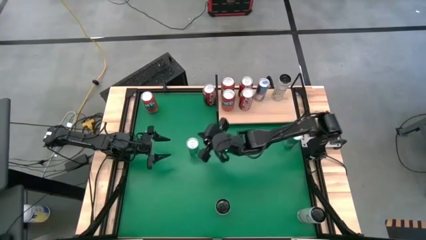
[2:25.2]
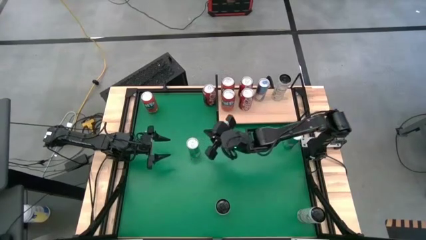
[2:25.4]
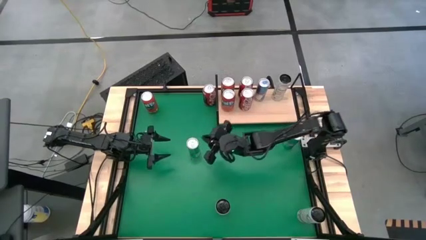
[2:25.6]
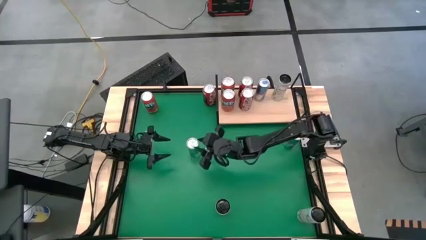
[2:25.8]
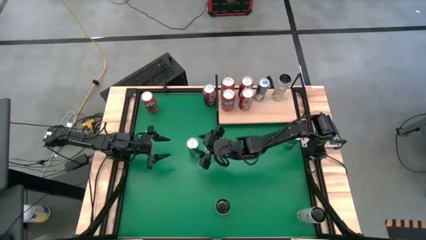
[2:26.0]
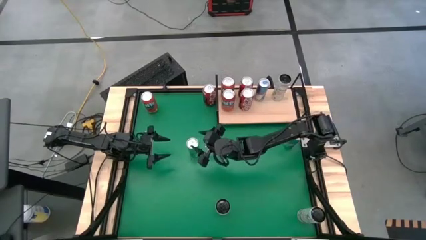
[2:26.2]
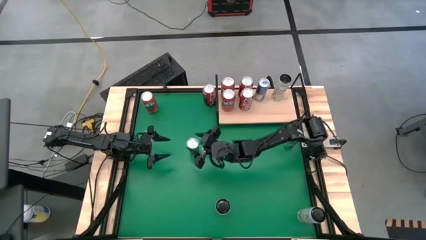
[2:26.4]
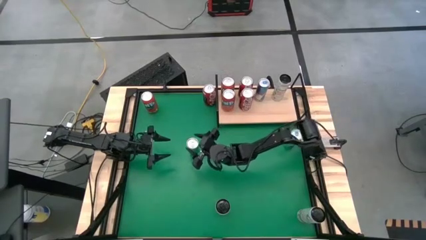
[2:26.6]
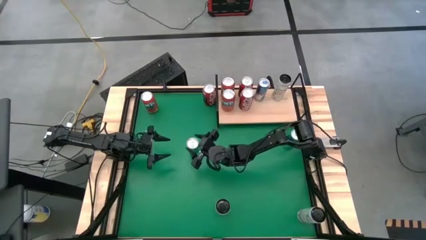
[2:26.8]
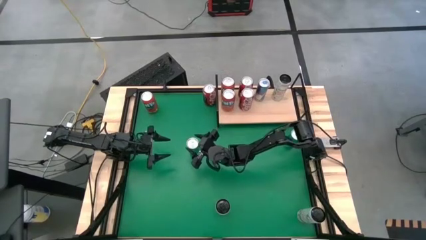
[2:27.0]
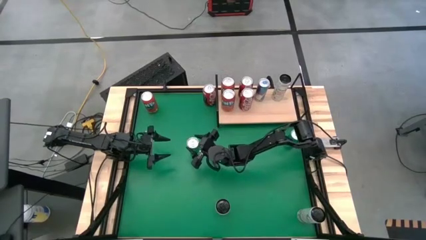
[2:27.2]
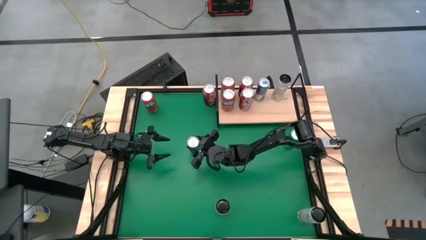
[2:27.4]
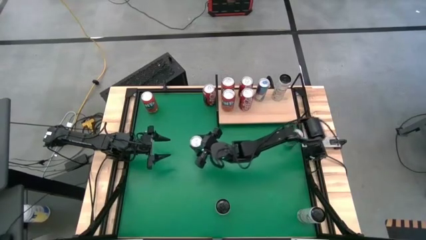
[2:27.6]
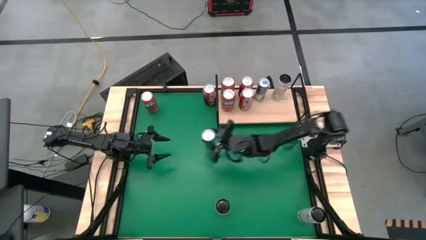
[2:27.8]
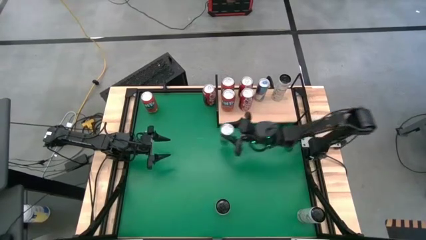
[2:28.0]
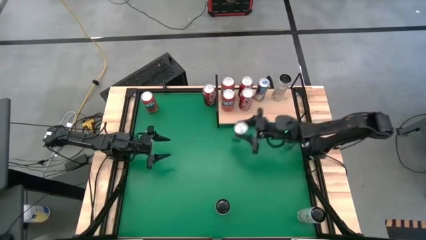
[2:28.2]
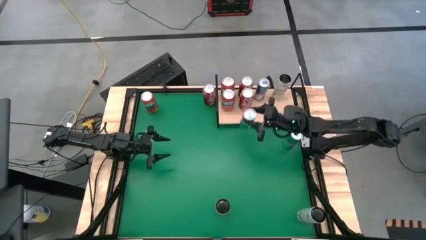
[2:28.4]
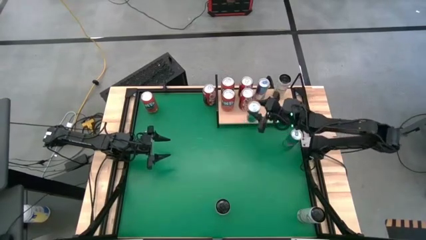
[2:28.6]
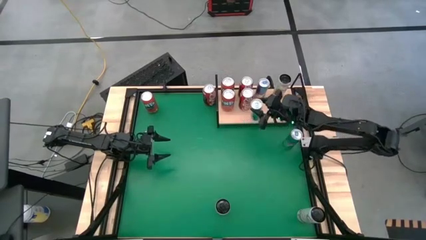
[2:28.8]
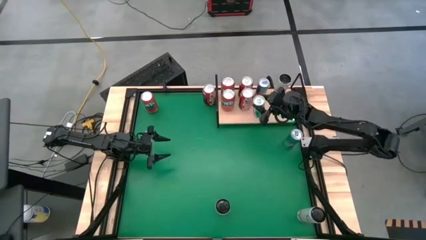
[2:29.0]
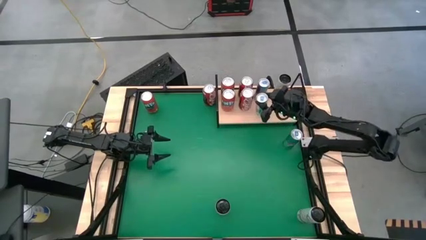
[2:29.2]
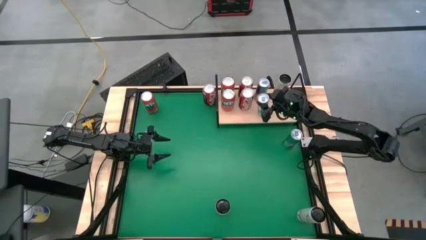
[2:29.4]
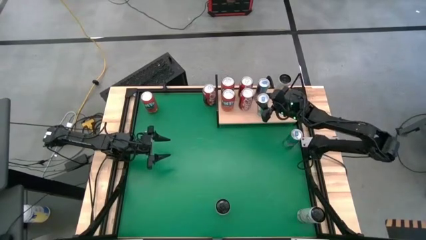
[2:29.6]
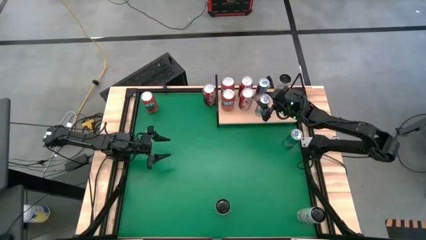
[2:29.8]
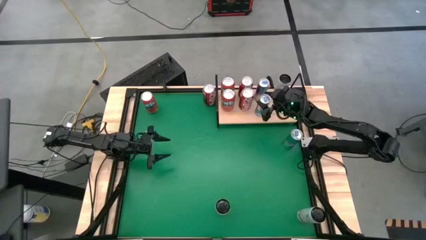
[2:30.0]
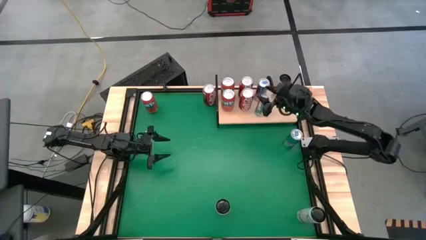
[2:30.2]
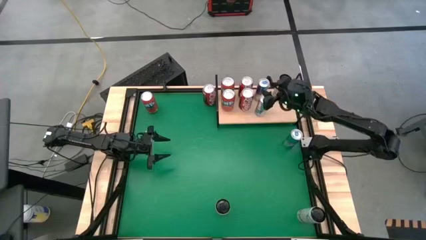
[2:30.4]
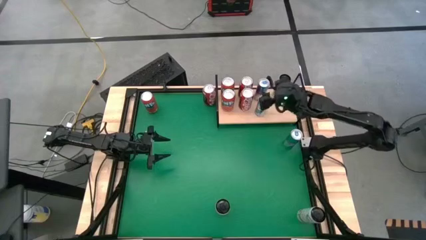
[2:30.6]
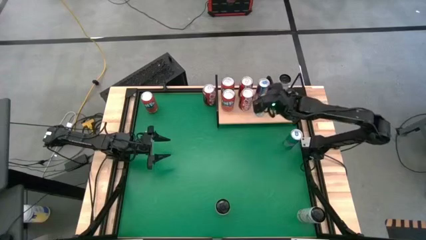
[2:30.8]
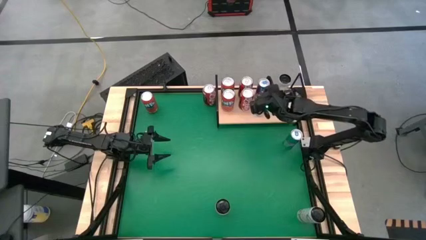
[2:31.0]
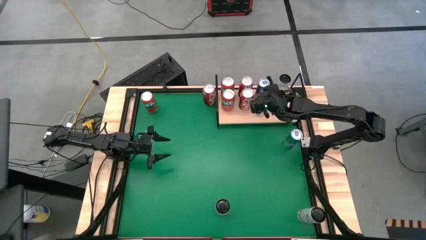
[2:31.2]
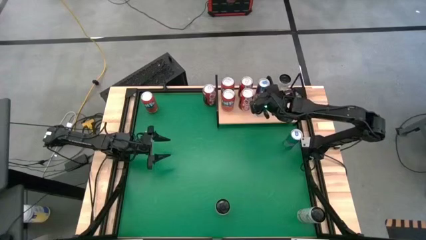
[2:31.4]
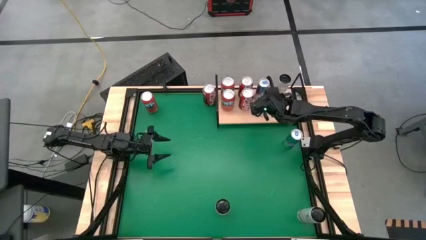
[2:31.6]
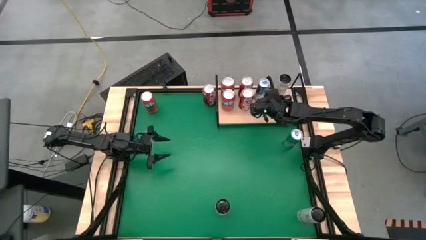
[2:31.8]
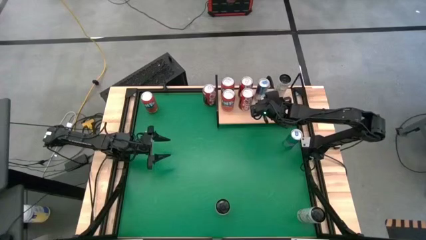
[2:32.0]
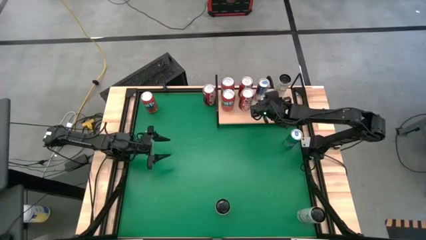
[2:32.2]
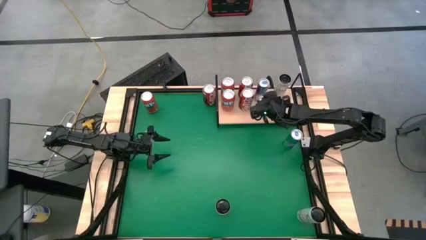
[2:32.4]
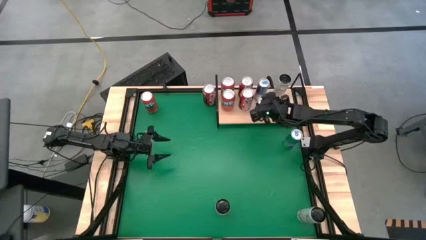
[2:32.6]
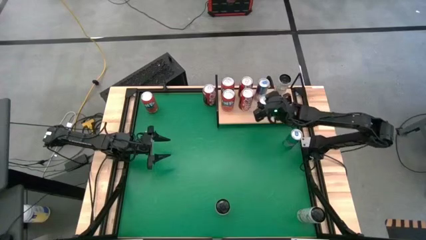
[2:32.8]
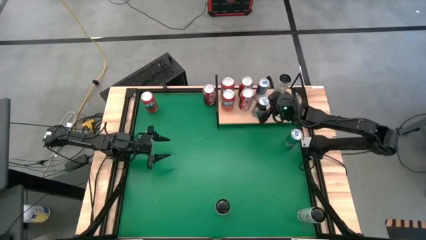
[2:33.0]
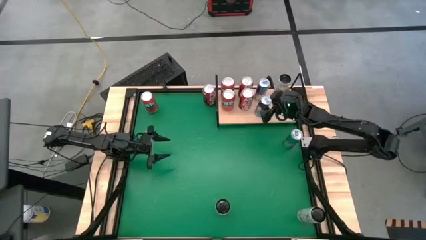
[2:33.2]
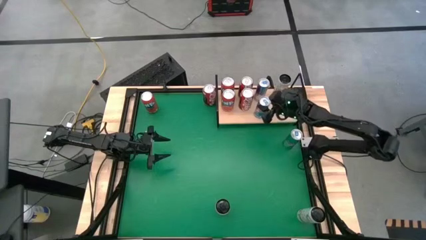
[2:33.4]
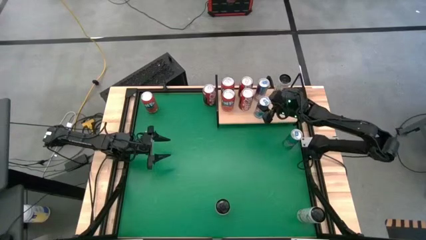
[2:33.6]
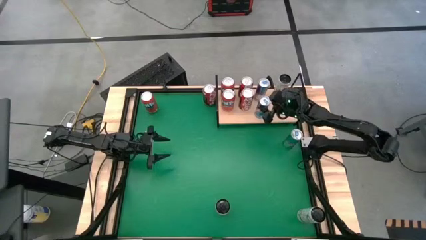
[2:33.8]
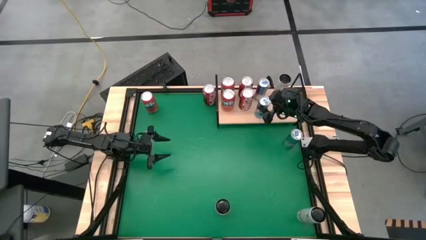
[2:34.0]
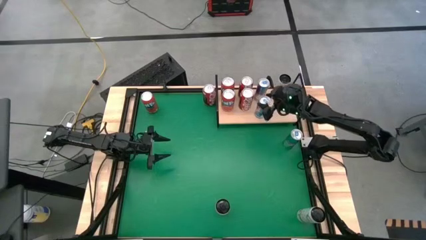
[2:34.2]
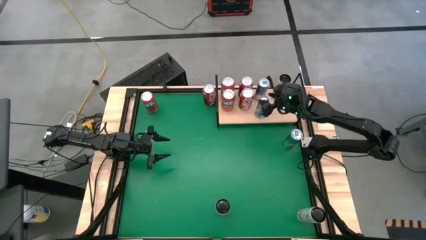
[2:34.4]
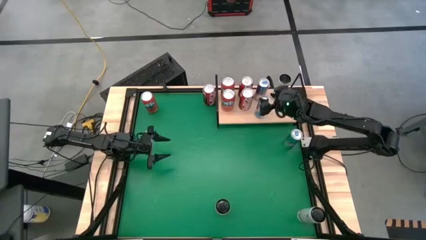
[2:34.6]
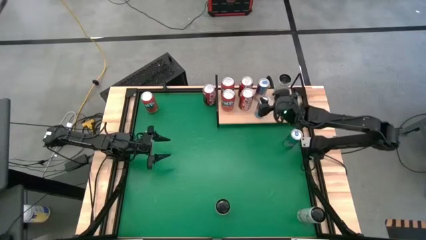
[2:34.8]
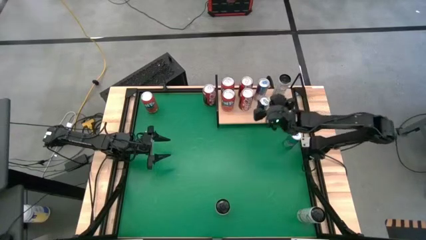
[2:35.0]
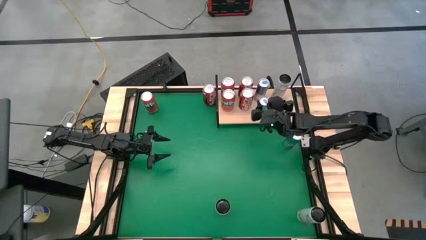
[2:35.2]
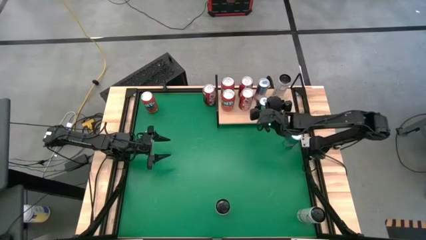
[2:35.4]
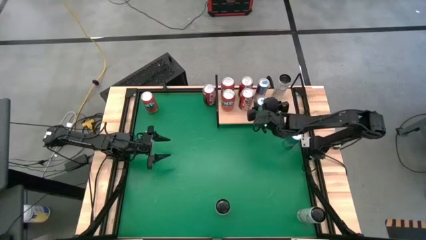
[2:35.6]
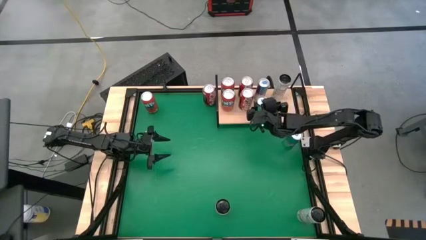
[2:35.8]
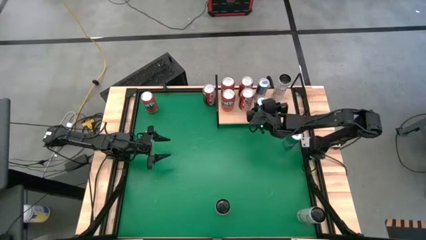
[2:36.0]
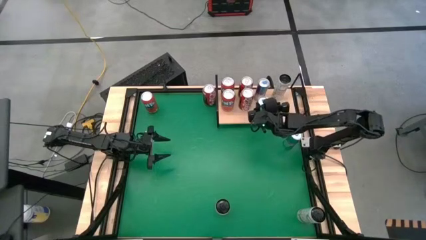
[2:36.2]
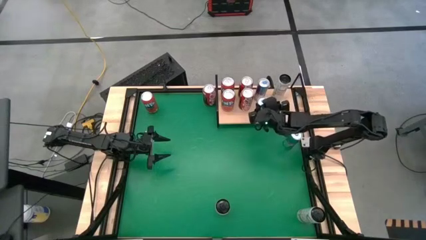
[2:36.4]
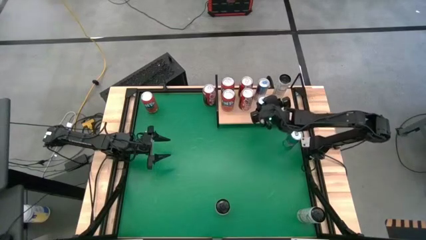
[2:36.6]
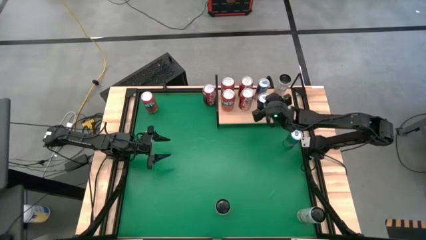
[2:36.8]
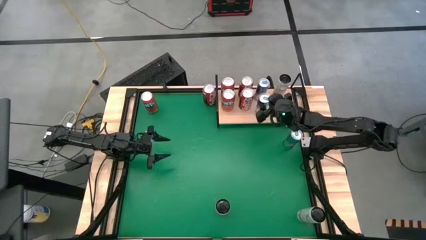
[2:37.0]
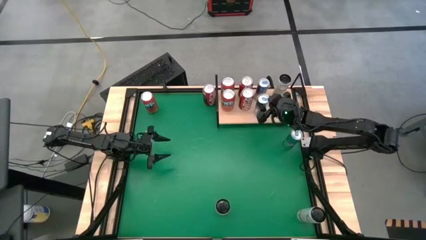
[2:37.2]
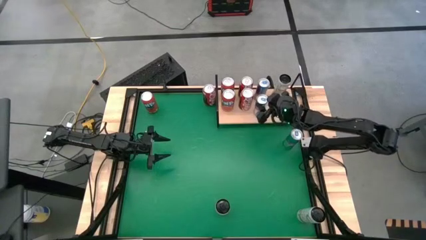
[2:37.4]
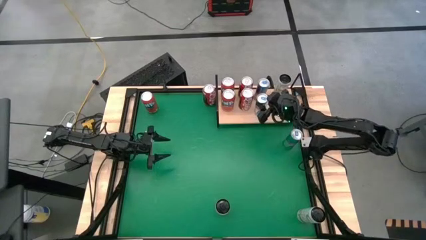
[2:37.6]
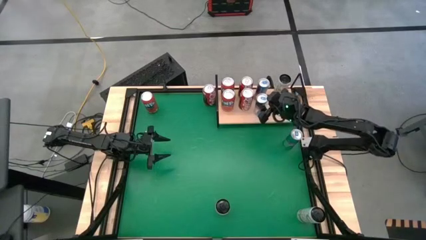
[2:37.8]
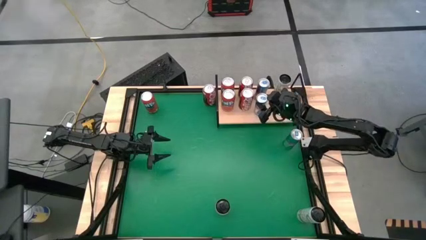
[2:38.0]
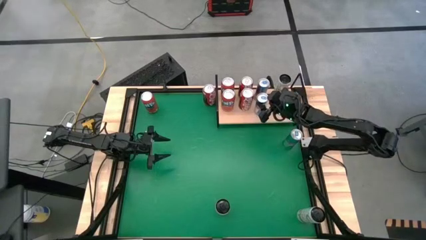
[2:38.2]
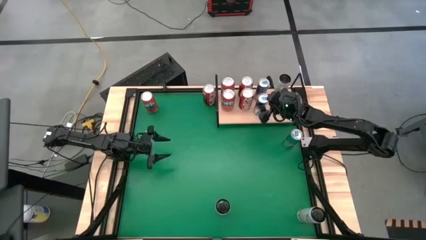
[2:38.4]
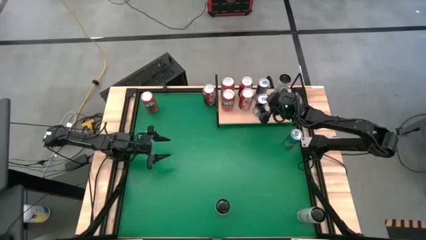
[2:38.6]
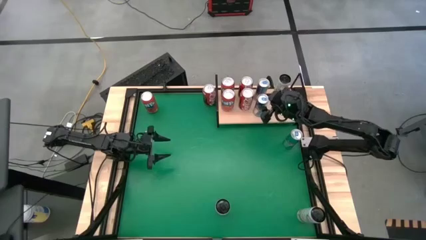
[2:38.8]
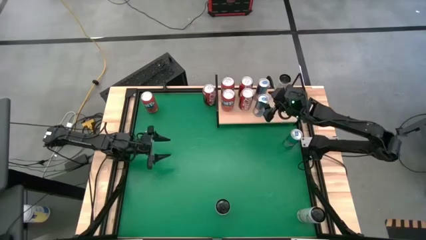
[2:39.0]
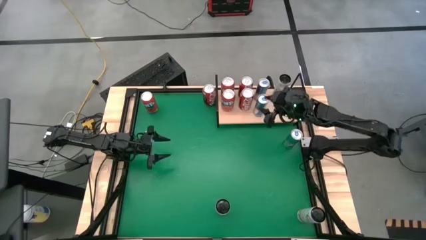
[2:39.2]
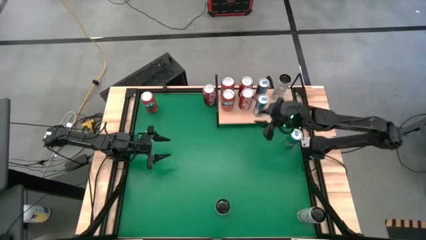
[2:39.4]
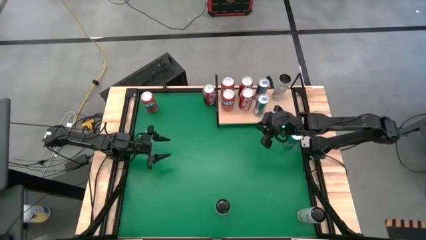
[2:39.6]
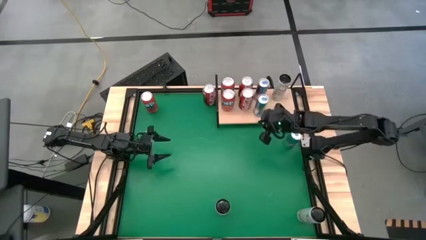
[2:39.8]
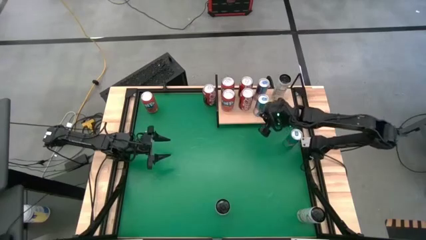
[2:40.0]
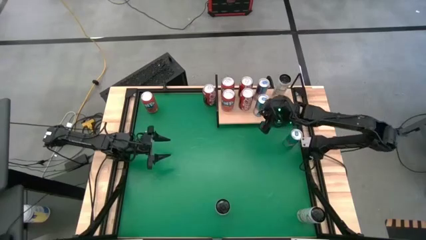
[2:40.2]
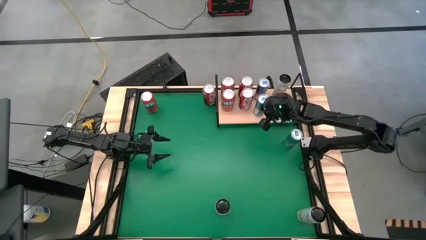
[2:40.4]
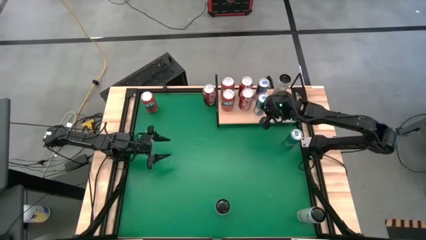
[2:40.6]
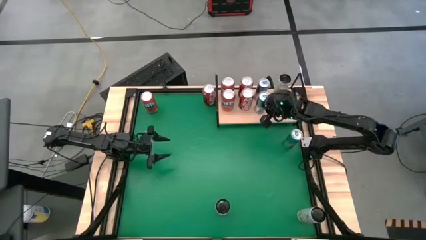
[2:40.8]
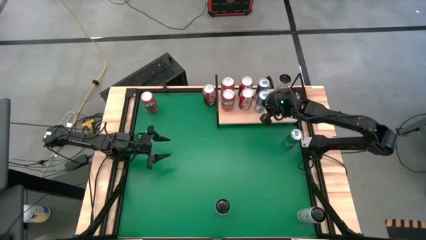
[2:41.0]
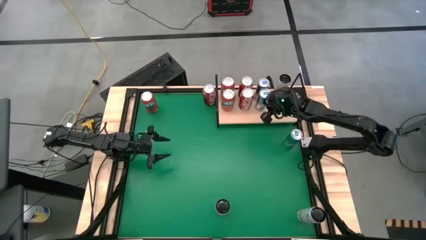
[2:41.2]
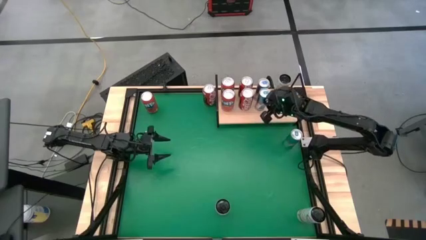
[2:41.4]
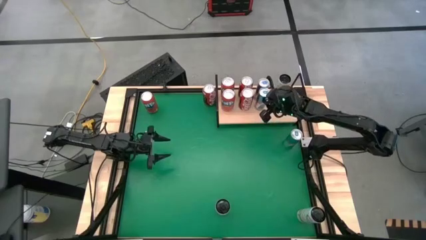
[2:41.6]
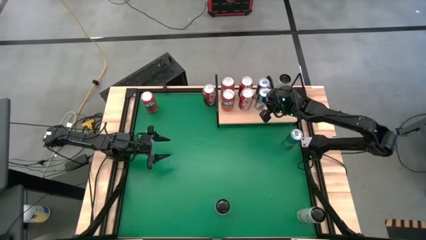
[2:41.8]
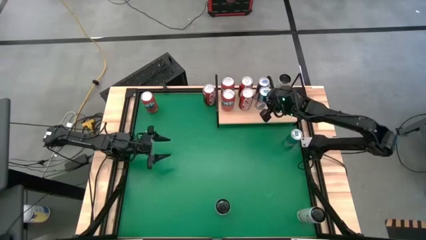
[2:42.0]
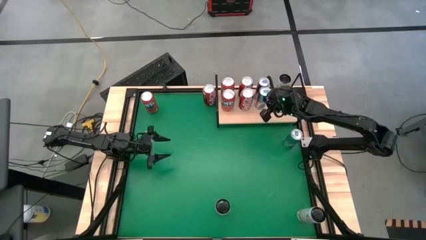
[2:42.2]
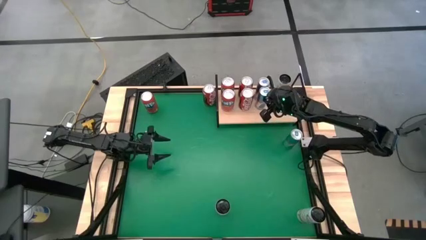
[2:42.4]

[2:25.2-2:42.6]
Task: Place canned beverage on shelf
Put the left blue soda can on the shelf aligned with the other blue soda can
